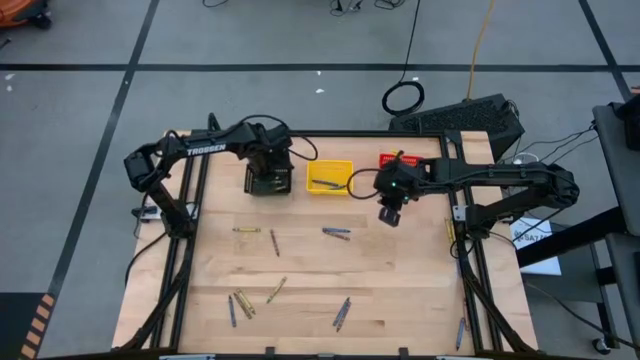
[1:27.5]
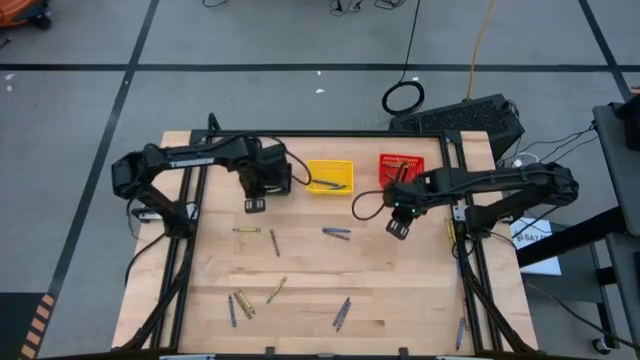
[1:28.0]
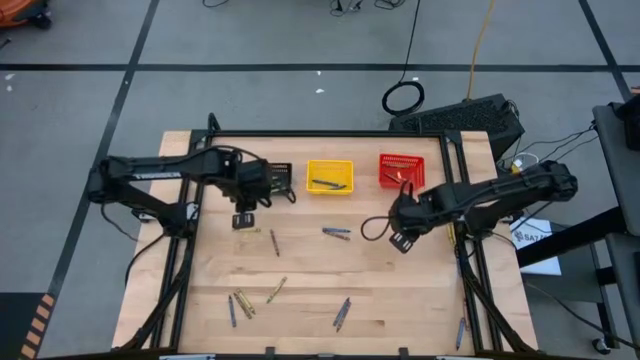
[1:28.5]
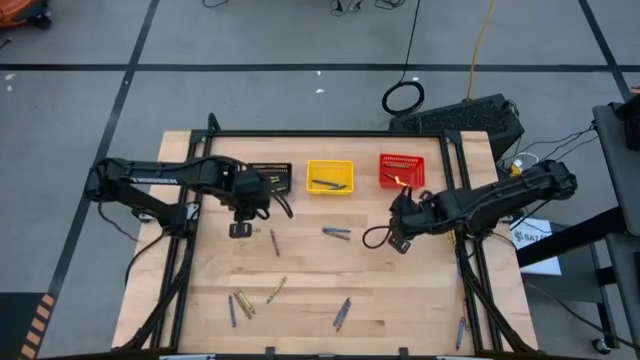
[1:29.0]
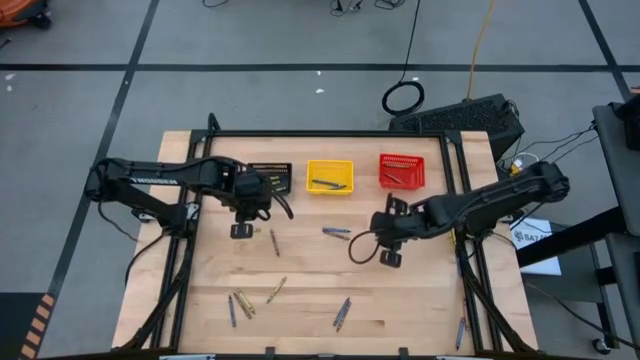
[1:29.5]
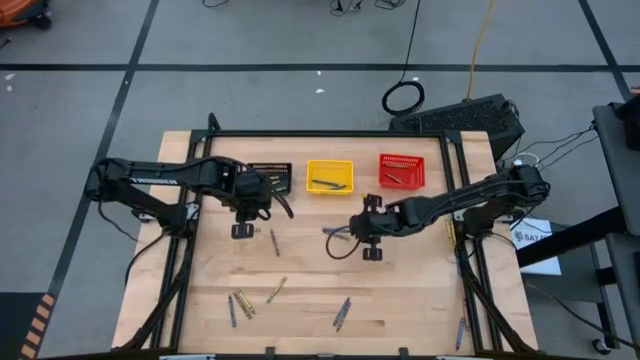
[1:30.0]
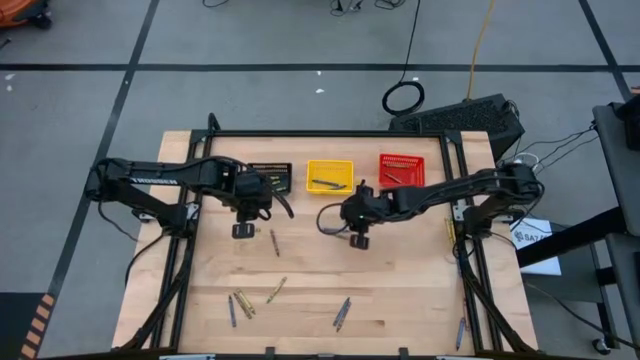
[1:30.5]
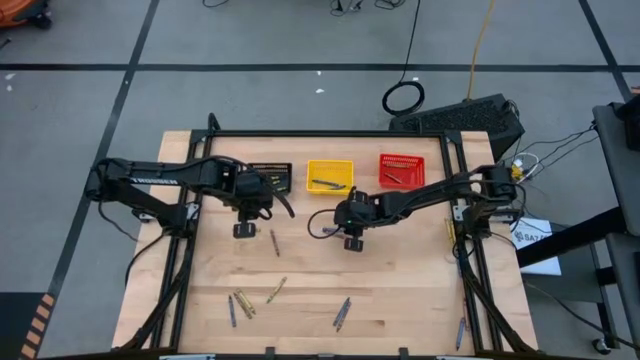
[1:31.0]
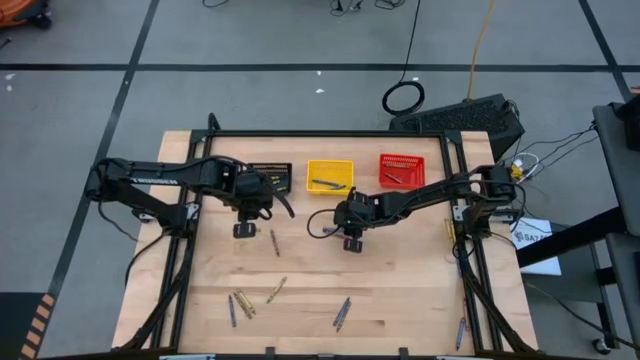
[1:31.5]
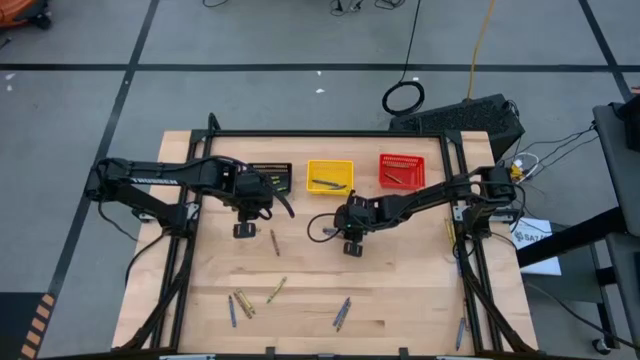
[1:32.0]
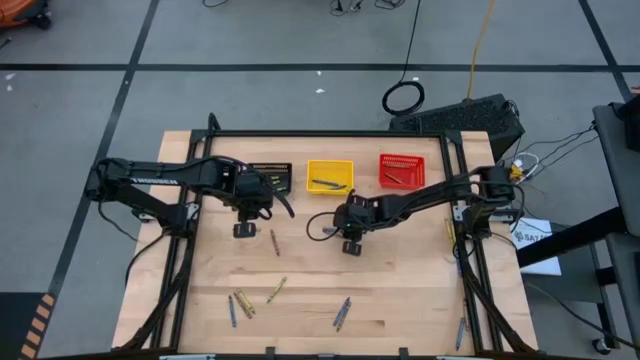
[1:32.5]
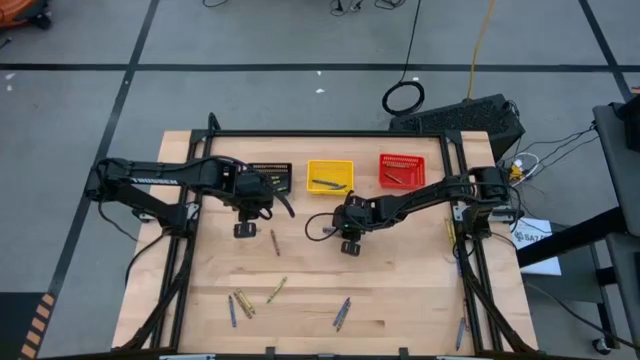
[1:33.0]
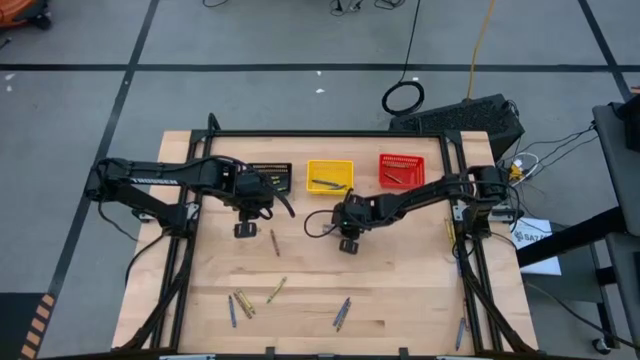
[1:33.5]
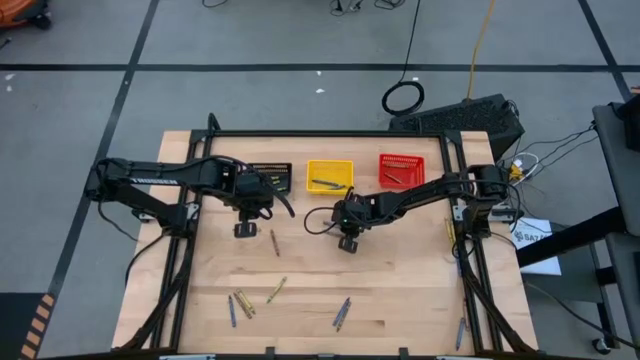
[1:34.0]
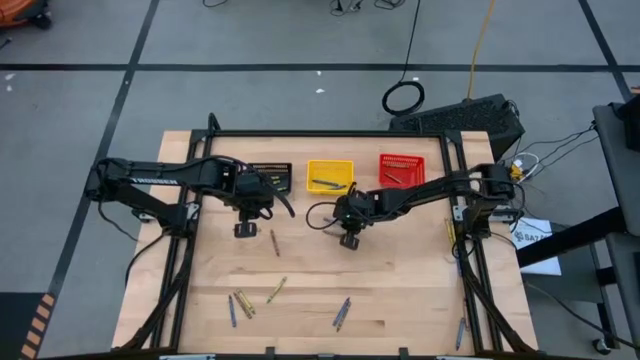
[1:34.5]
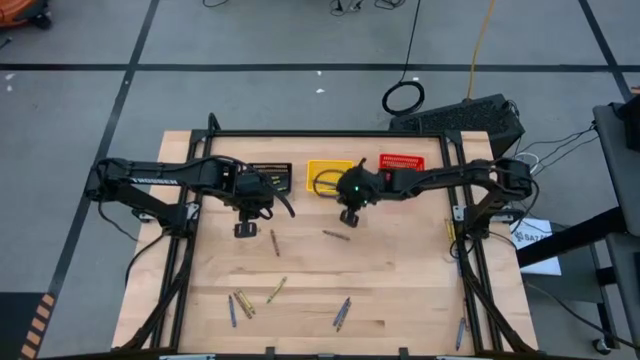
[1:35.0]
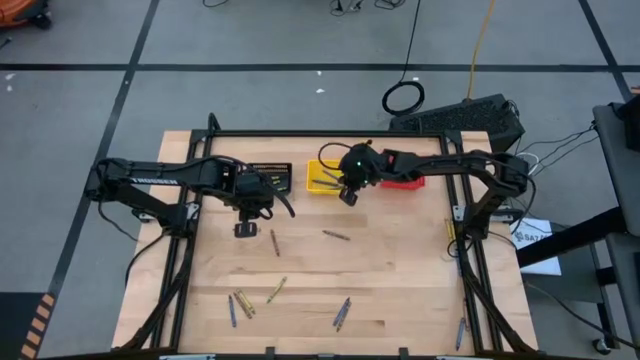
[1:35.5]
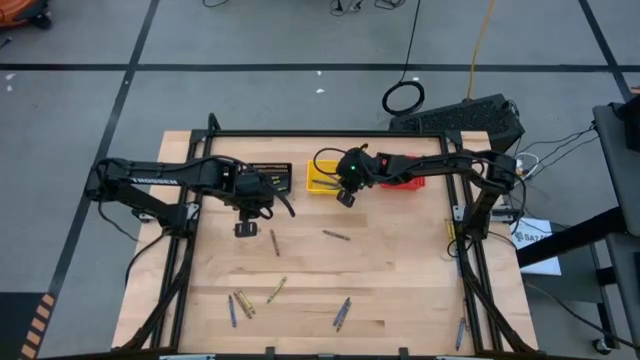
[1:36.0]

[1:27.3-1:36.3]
Task: Sort crayons
Put the blue crayon into the yellow bin

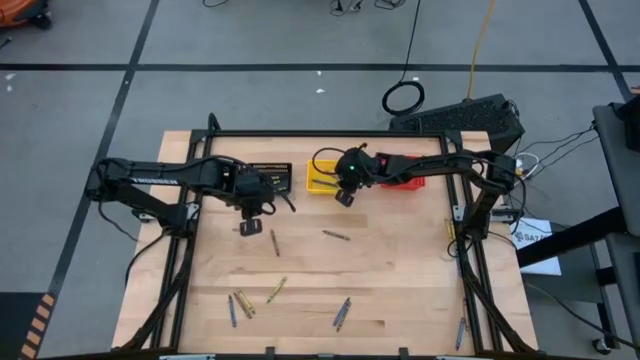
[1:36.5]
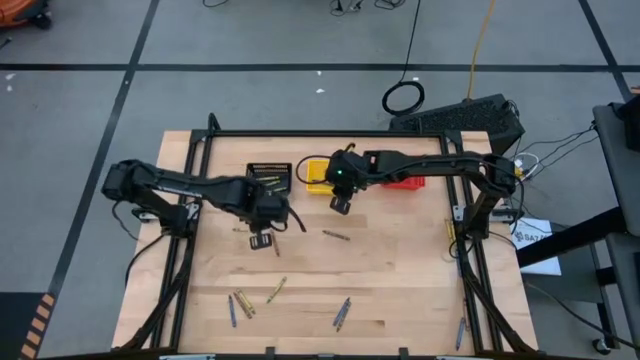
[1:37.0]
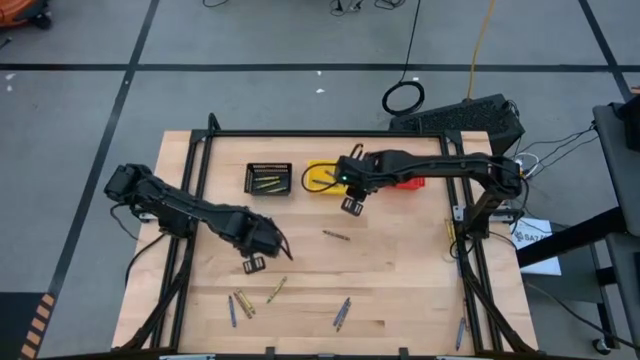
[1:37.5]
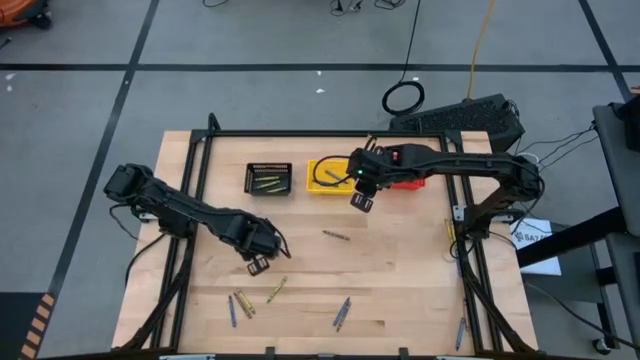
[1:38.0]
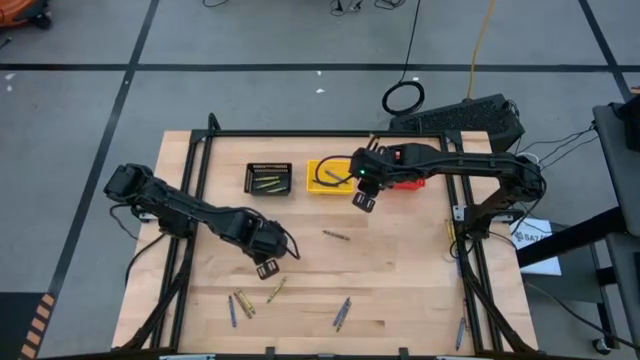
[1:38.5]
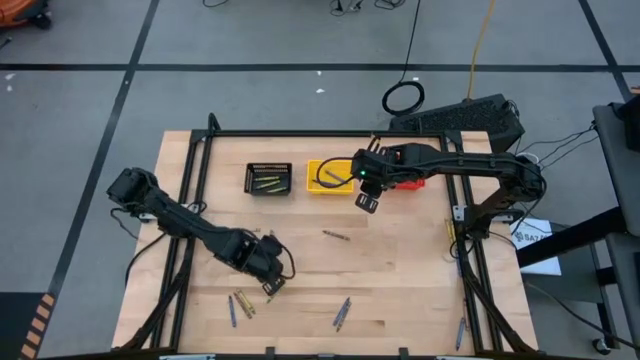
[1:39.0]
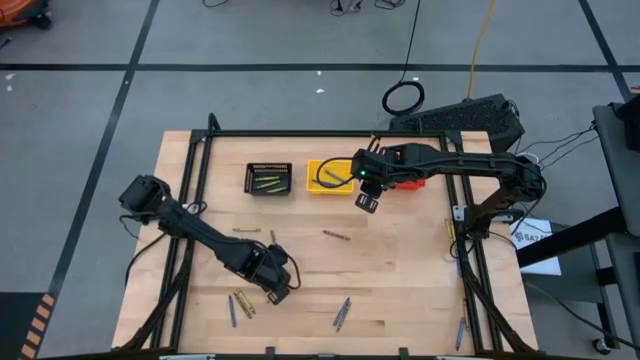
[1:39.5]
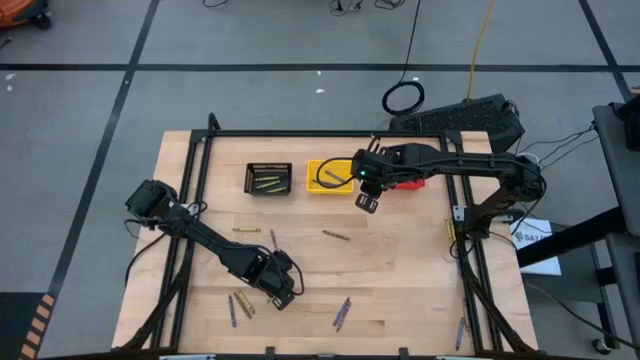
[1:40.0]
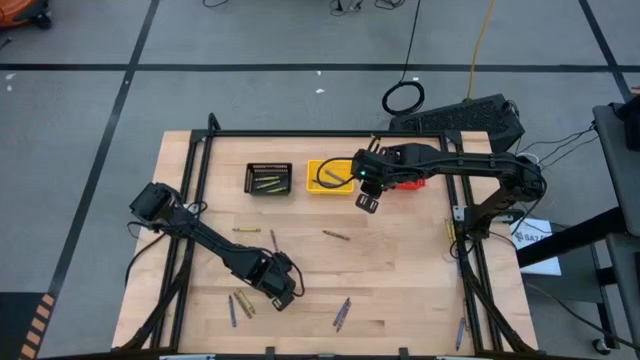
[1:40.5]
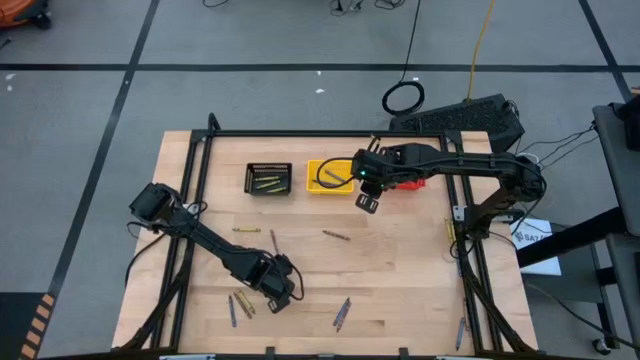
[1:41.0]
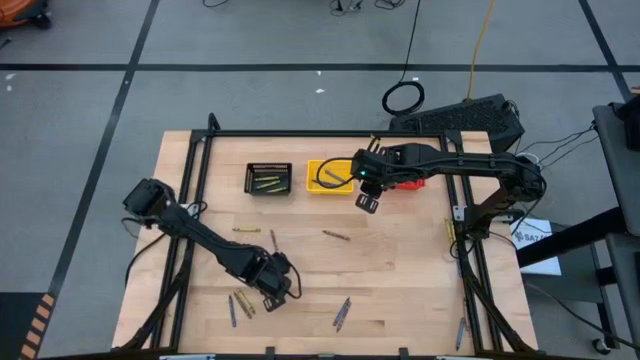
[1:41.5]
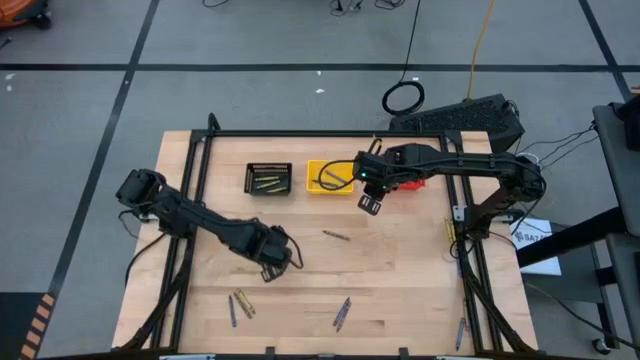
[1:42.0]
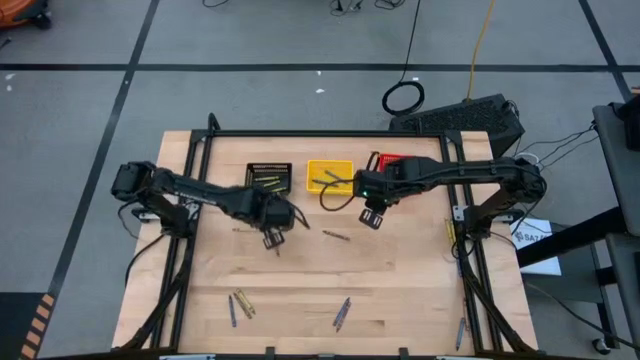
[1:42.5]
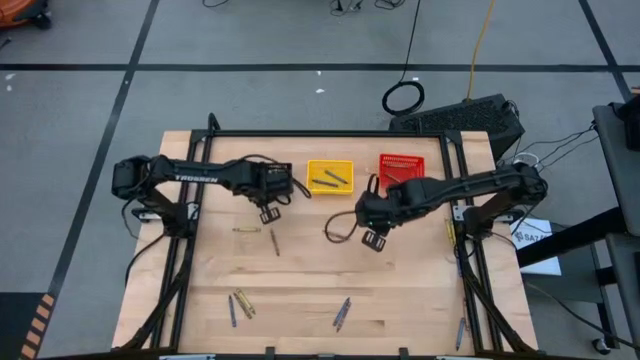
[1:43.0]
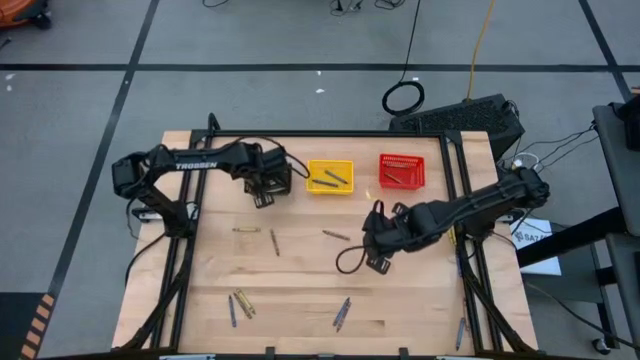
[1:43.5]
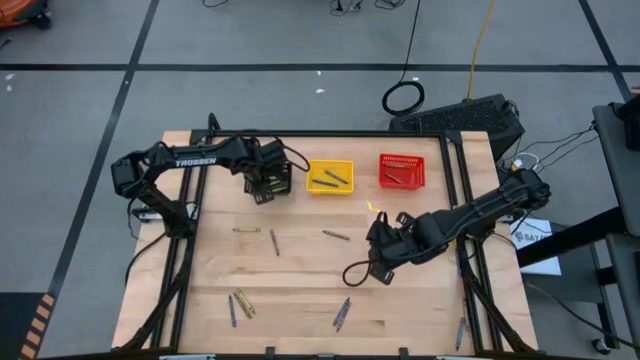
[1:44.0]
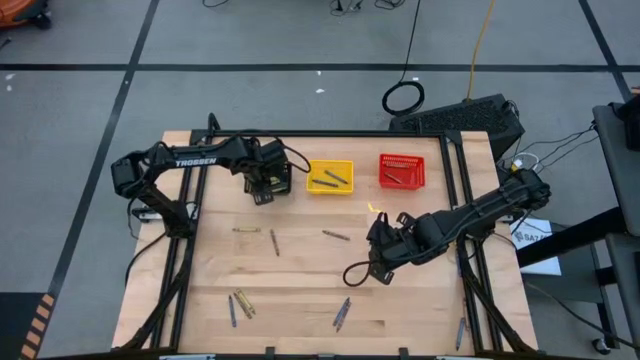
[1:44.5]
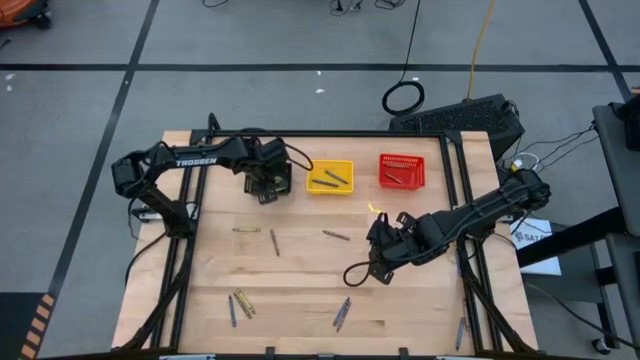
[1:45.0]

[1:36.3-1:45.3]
Put the green crayon into the black bin

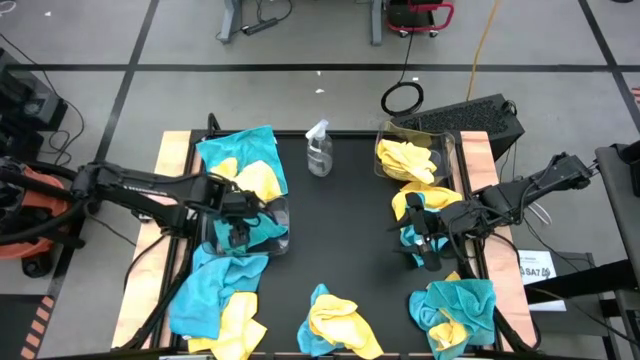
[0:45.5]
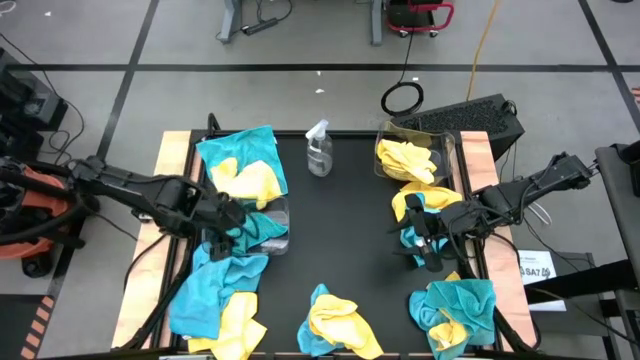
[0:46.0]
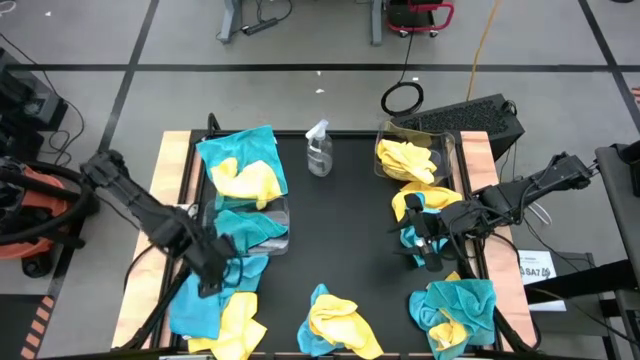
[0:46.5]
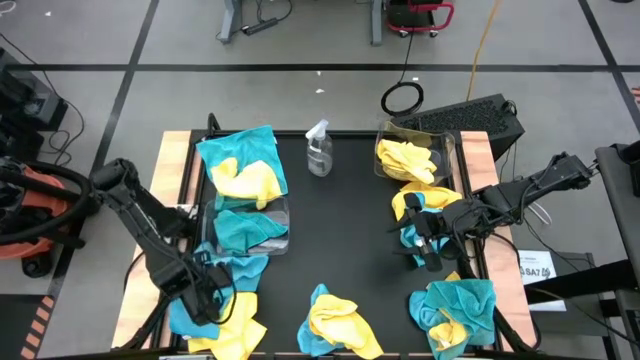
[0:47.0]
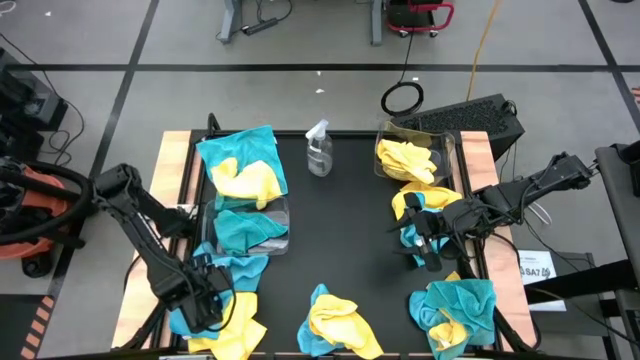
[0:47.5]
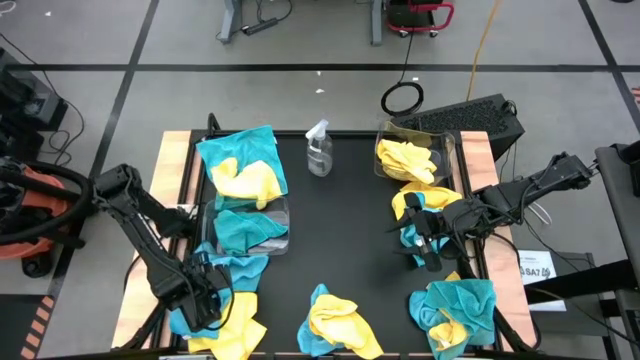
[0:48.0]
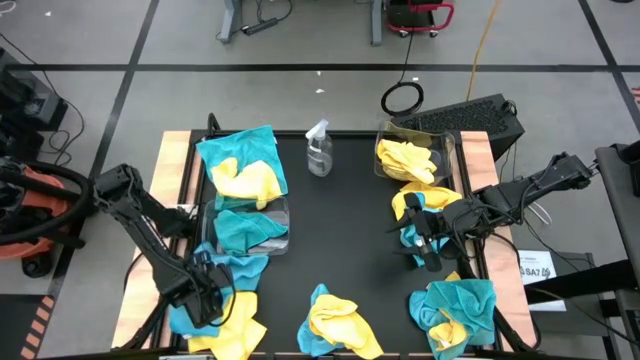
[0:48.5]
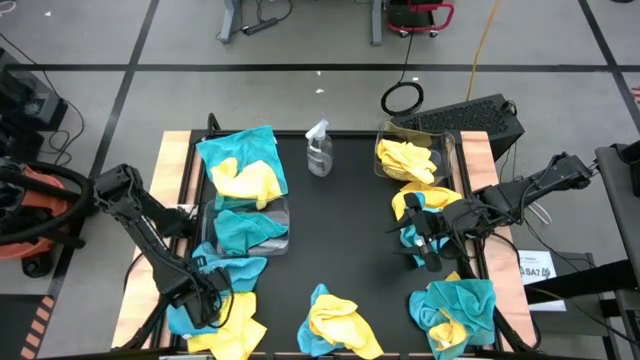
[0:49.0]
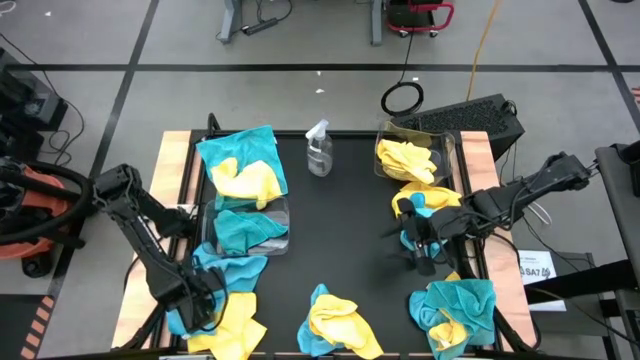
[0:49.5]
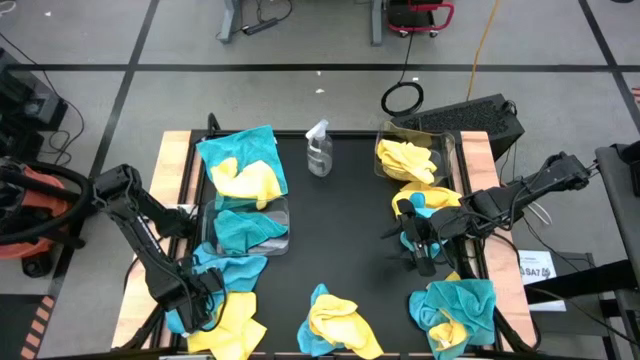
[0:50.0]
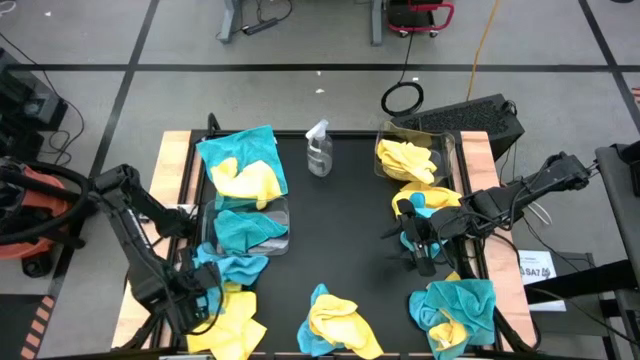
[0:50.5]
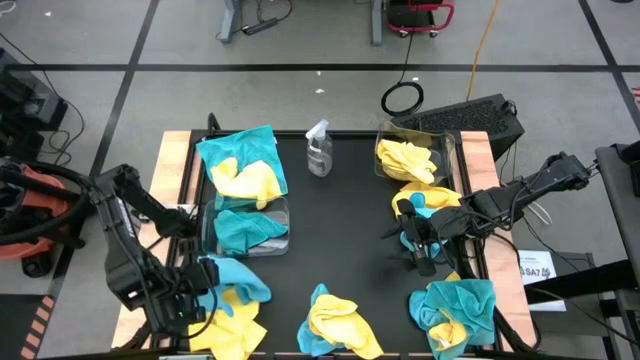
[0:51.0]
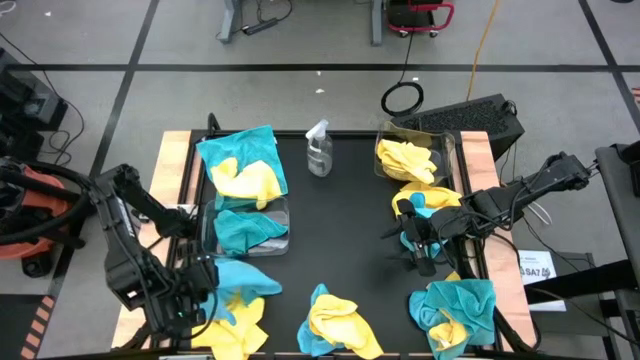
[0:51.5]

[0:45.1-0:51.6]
Task: Sort microfiber towel by color & place in baskets
Put the blue towel into the bottom transparent bin
